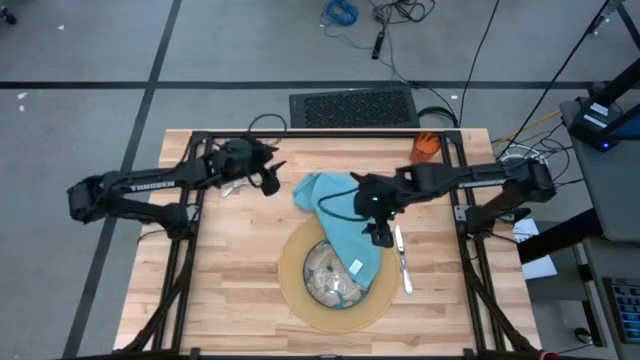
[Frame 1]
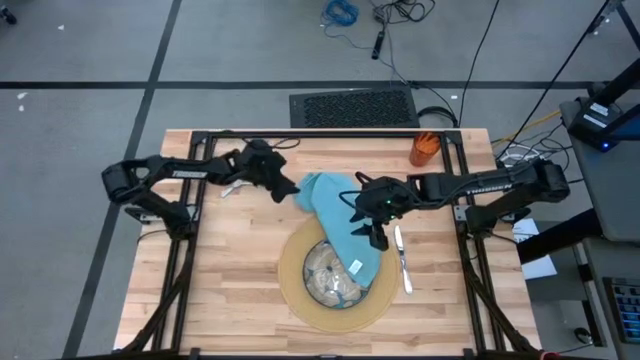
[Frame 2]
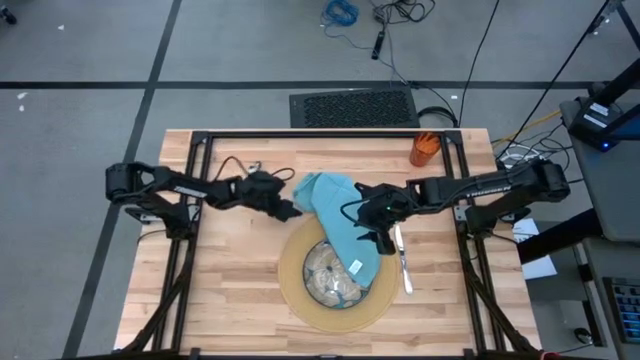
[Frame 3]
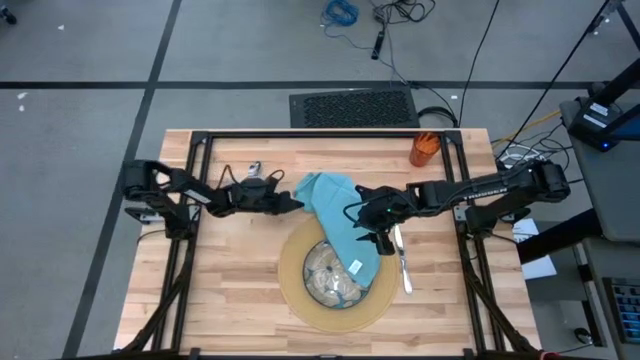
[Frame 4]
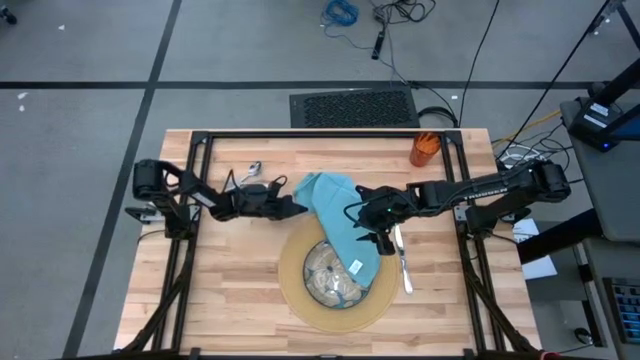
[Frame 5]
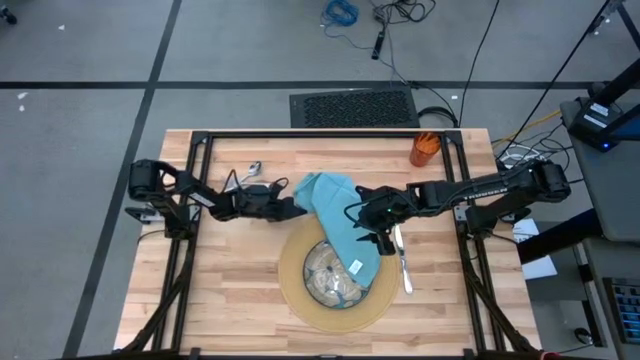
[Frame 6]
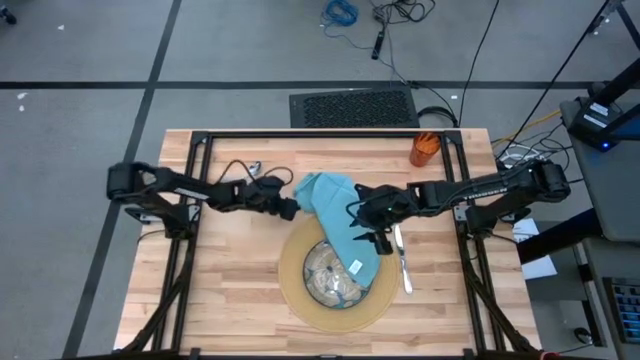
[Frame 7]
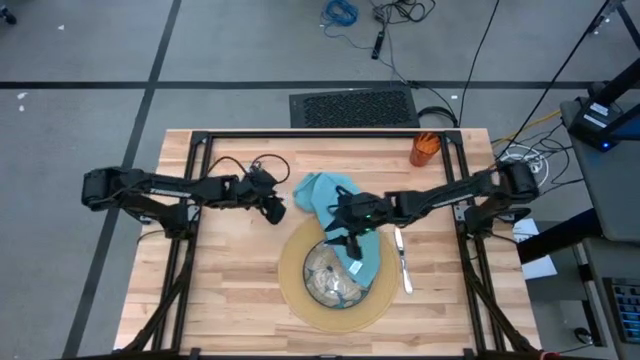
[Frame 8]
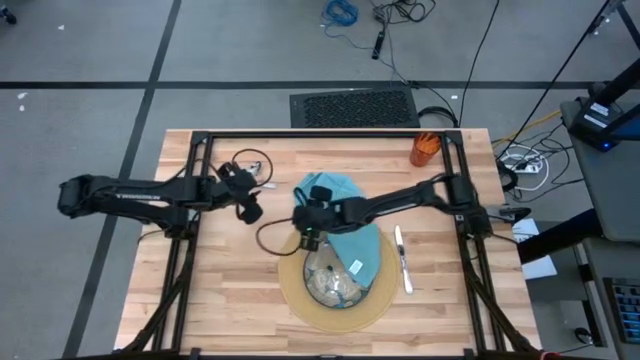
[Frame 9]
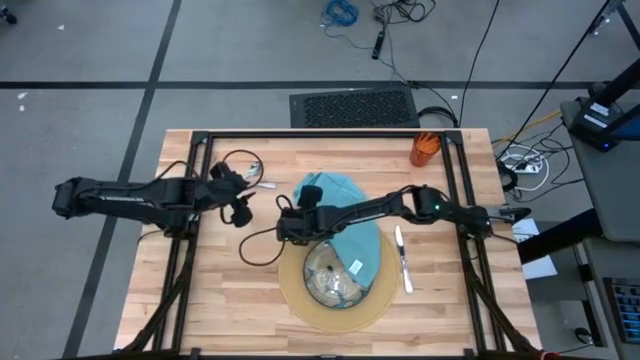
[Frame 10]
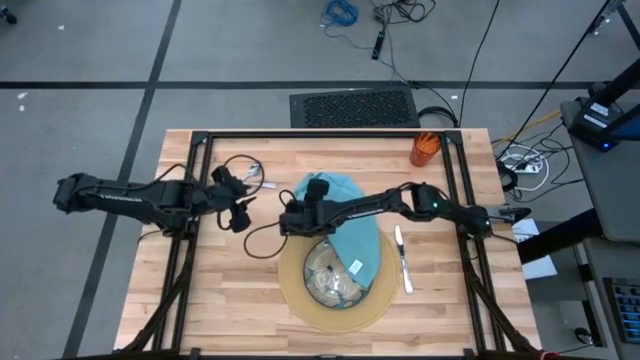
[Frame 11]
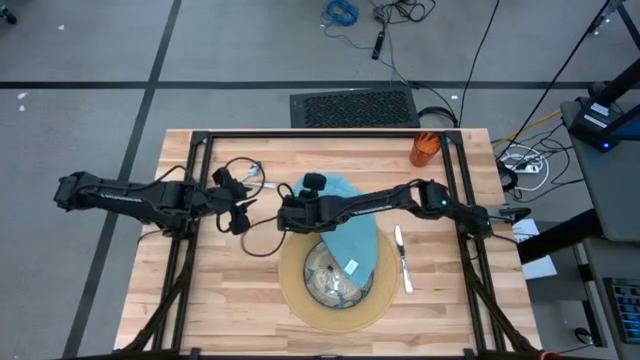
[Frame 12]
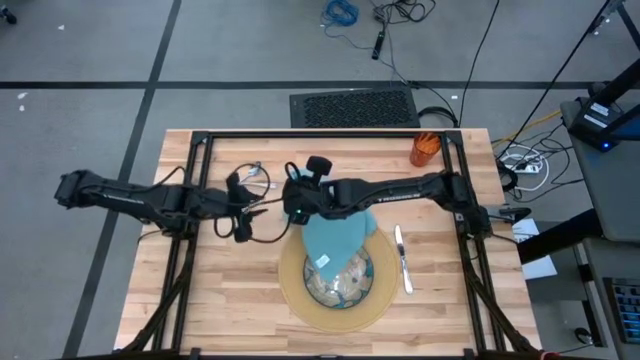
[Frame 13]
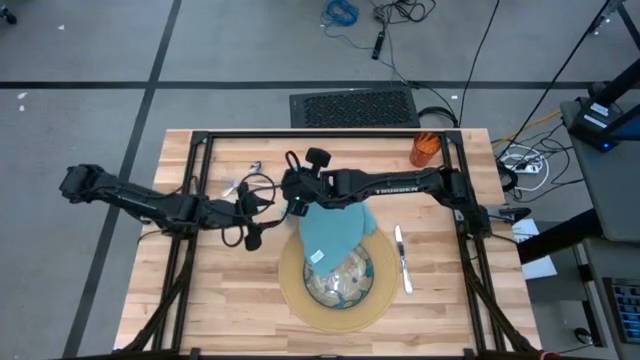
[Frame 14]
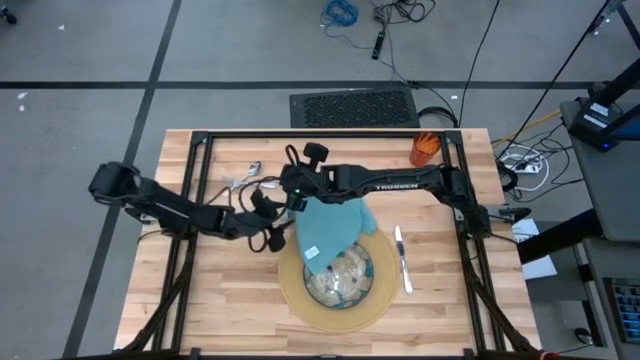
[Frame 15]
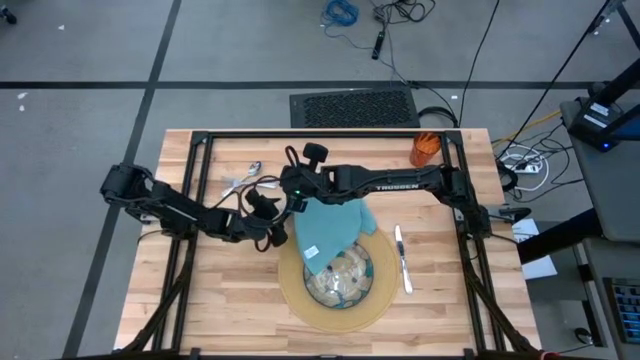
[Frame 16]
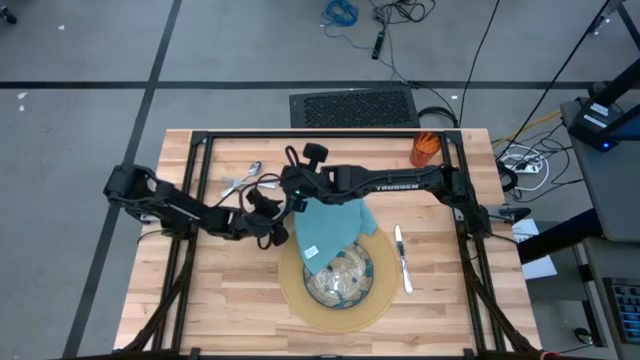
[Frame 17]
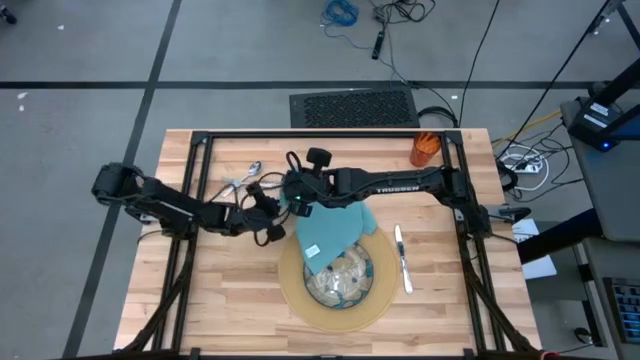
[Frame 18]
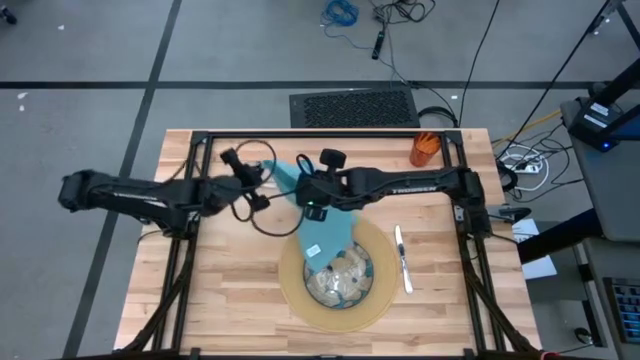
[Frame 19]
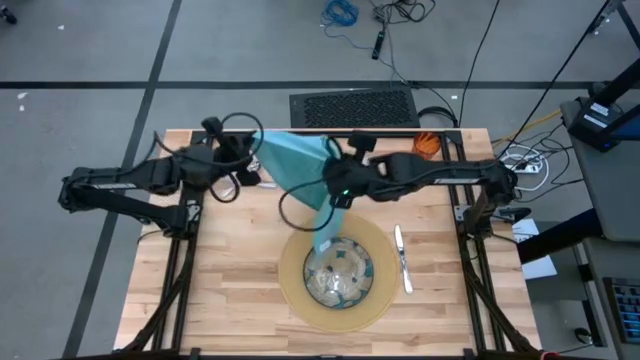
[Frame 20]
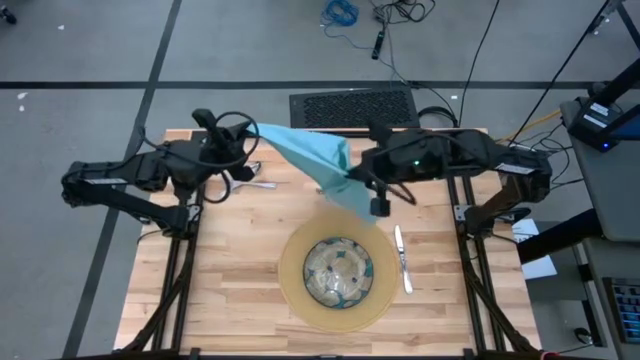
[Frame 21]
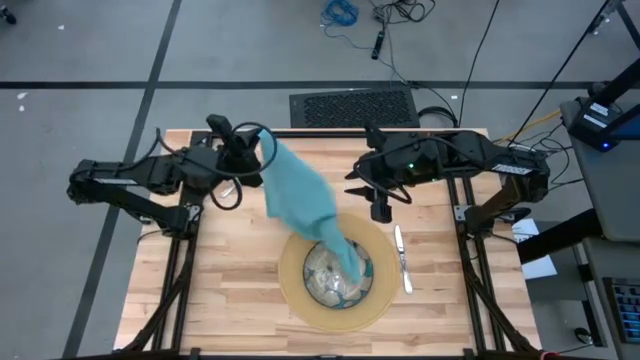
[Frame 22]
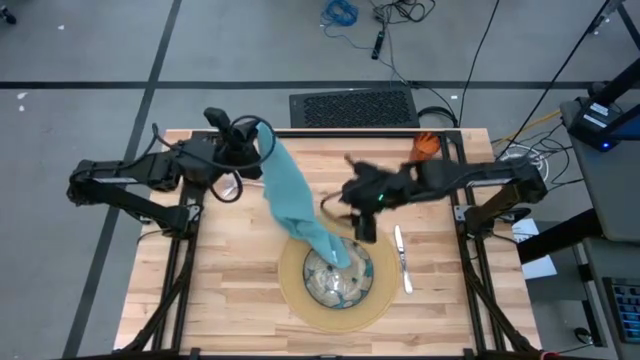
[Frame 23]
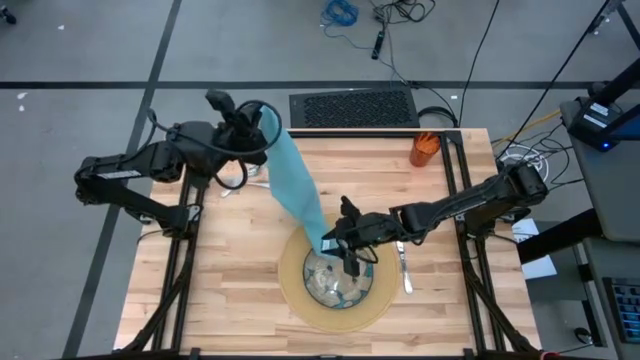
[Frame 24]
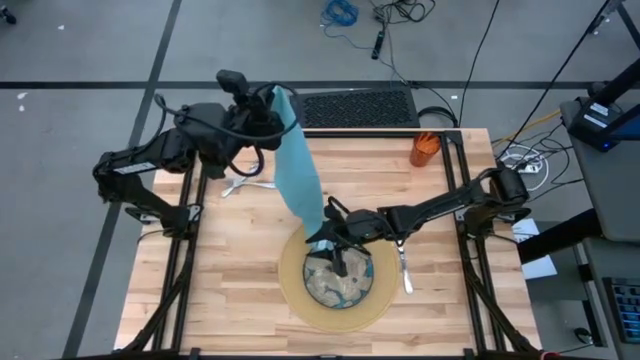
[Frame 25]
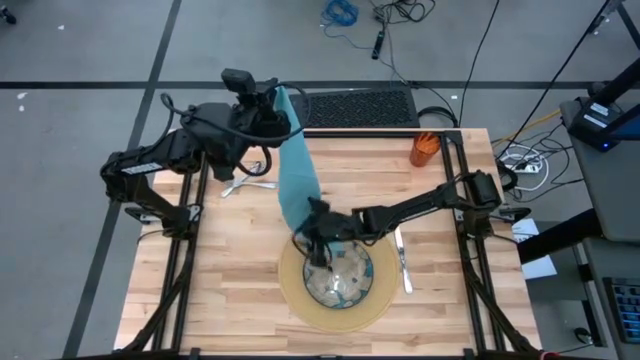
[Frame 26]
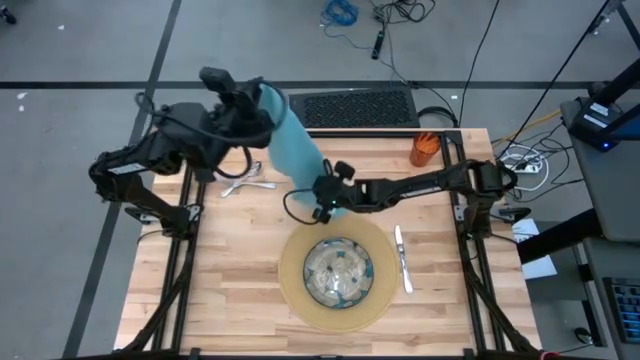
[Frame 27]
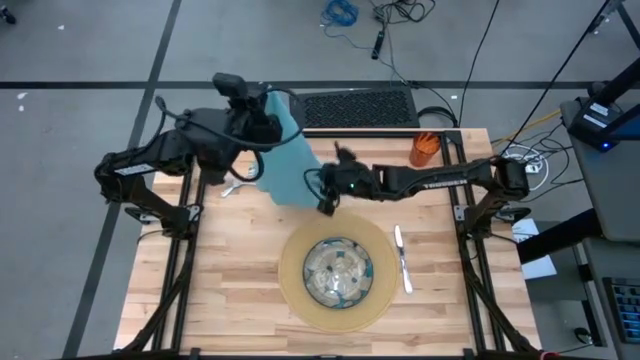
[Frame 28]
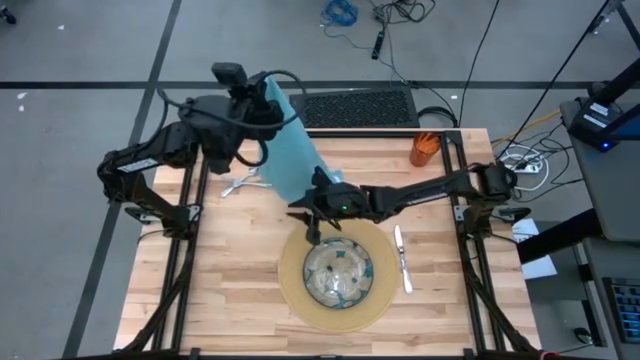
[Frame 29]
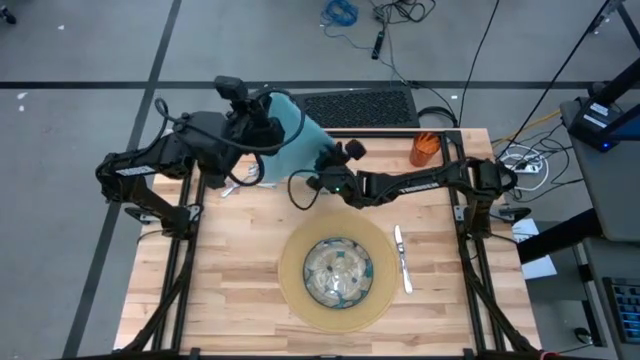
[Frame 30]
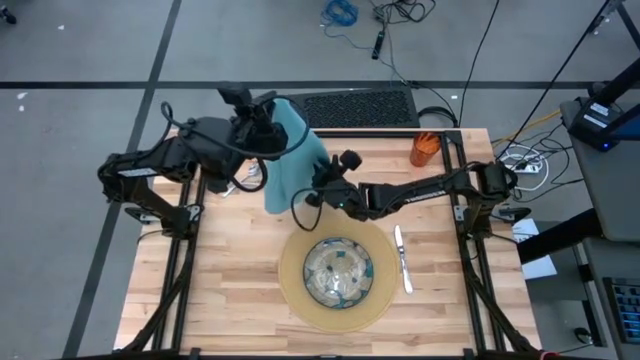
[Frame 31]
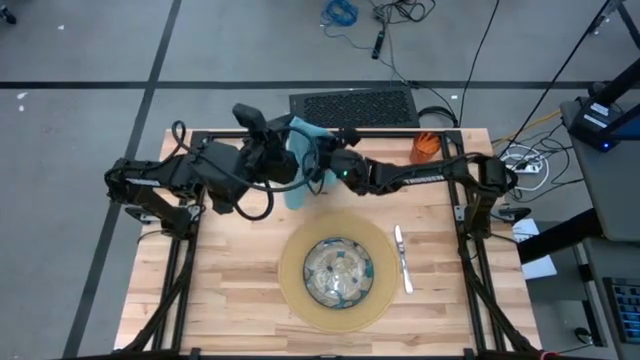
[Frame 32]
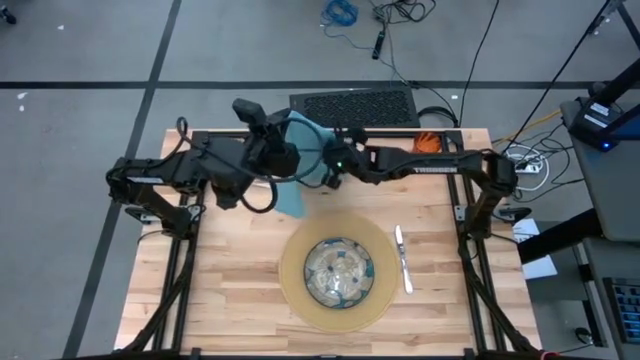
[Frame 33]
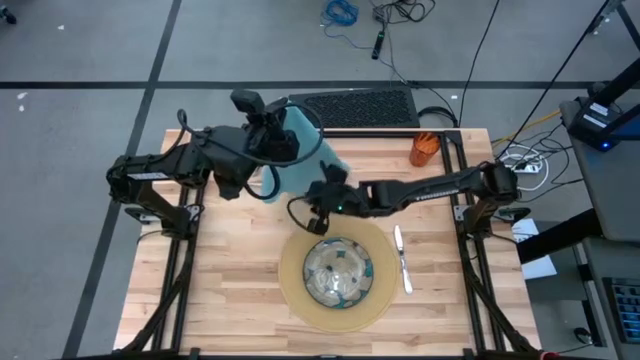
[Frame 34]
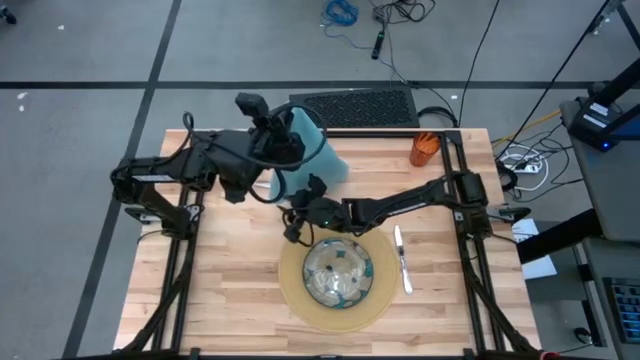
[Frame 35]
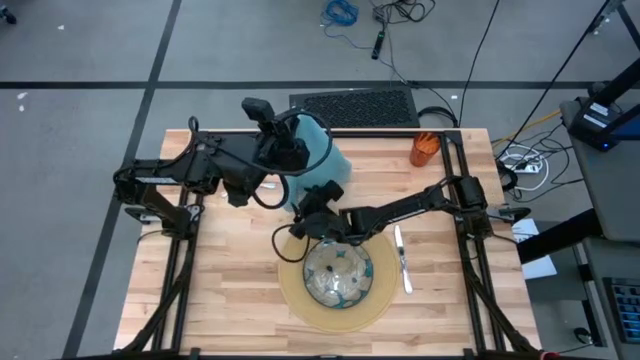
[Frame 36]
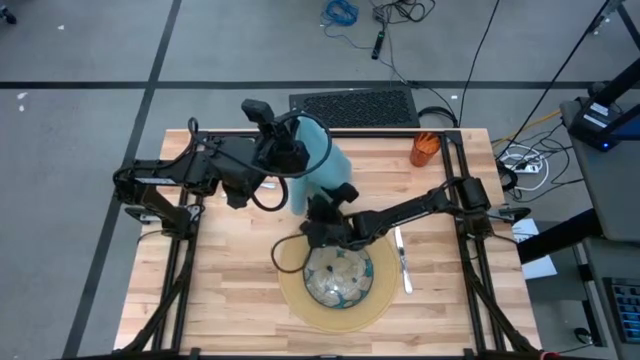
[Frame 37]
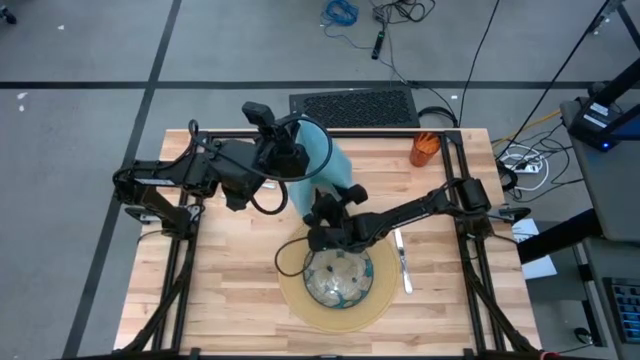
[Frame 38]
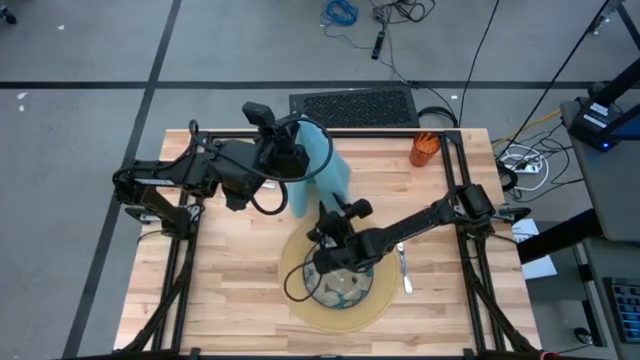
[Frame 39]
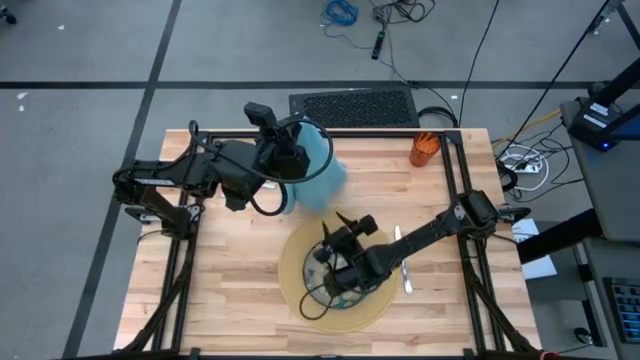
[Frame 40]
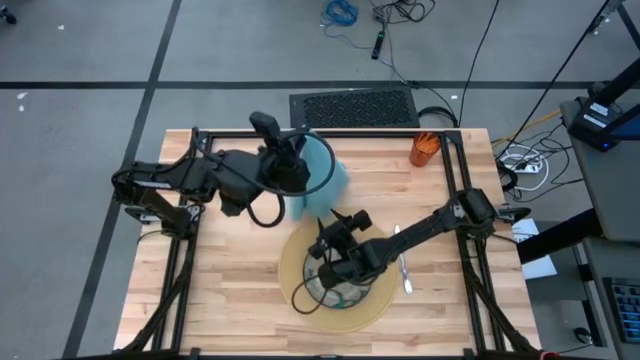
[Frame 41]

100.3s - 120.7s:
Task: Set table place
Fold the blue napkin
